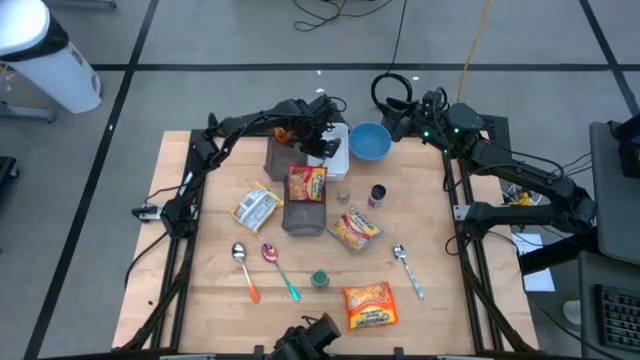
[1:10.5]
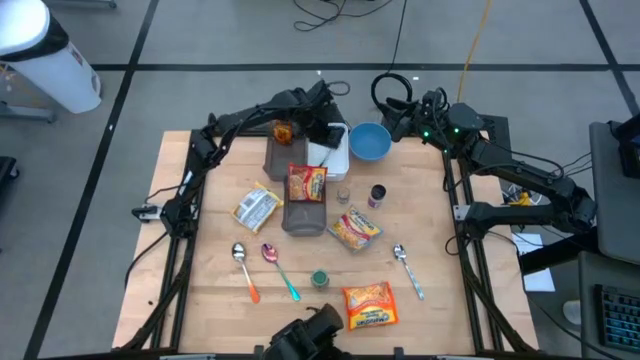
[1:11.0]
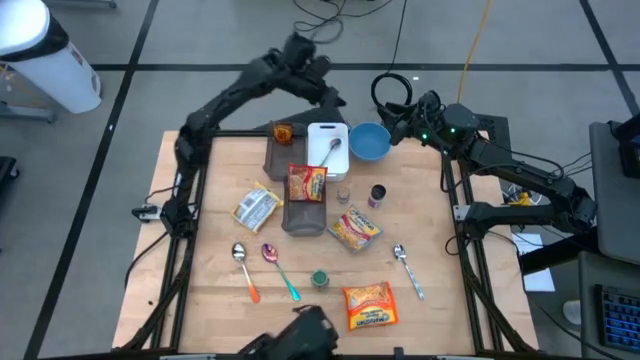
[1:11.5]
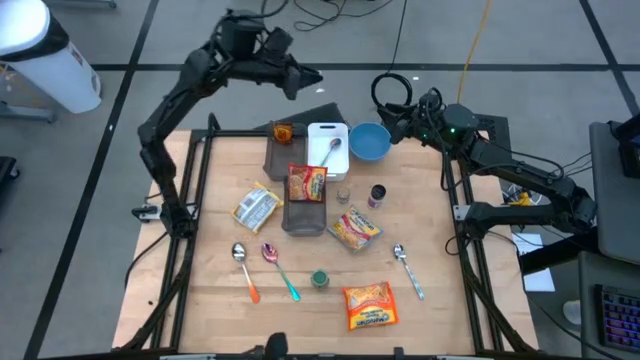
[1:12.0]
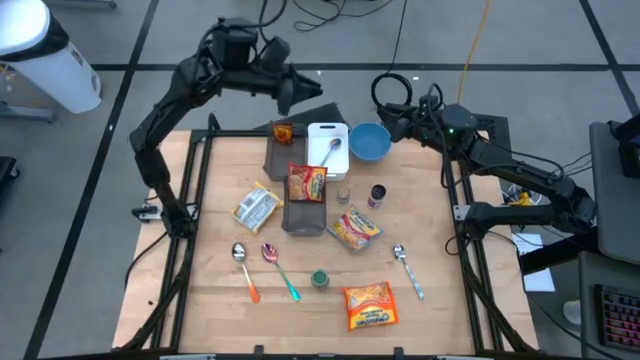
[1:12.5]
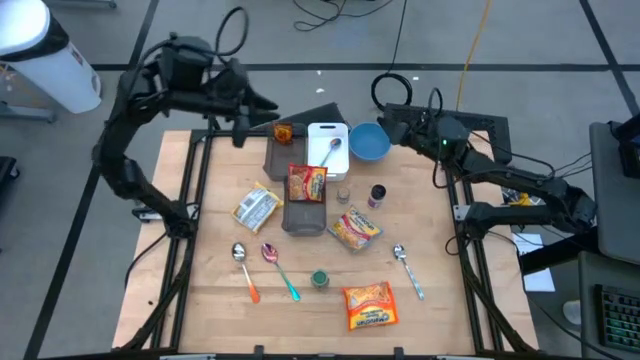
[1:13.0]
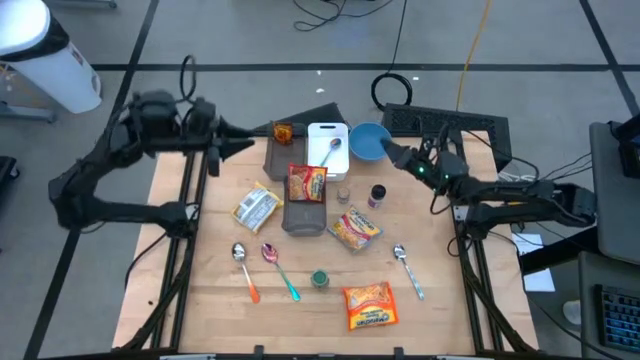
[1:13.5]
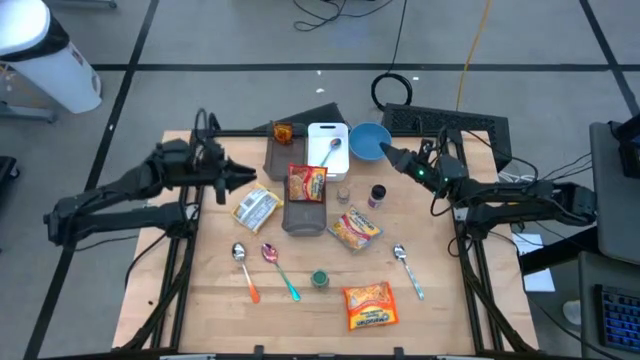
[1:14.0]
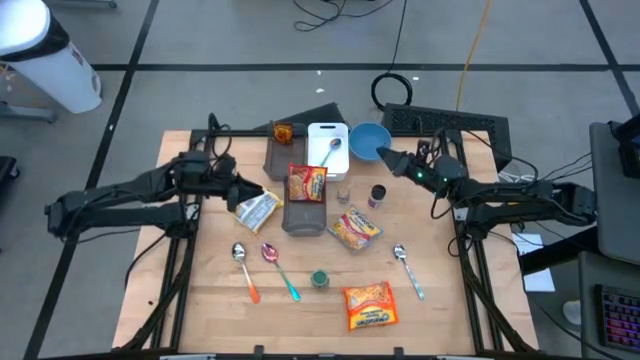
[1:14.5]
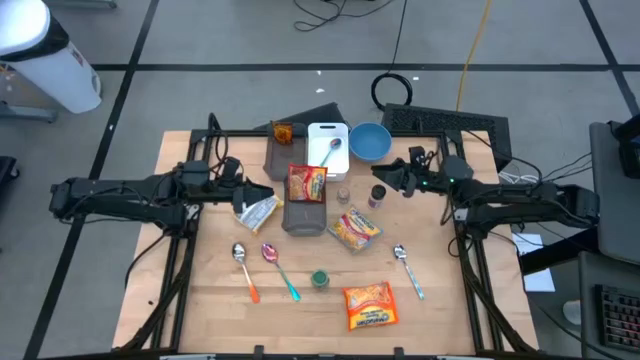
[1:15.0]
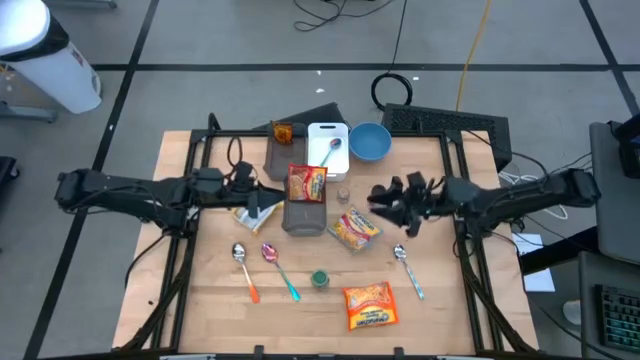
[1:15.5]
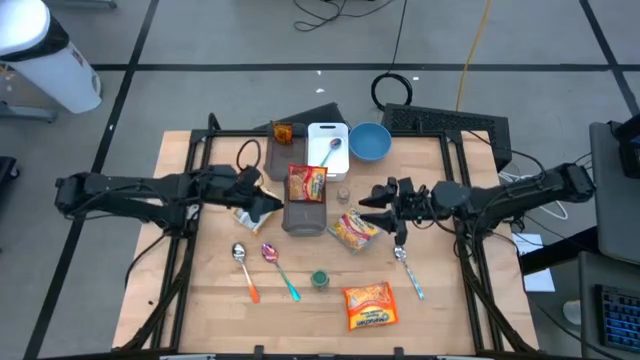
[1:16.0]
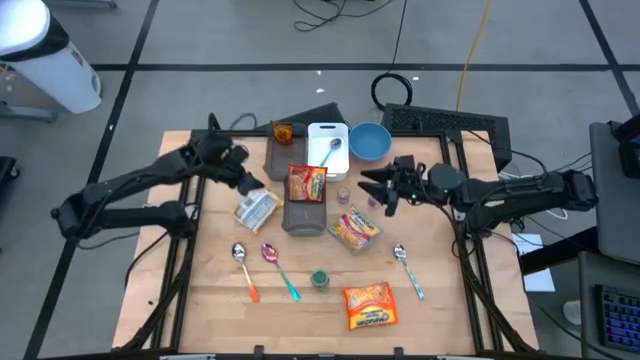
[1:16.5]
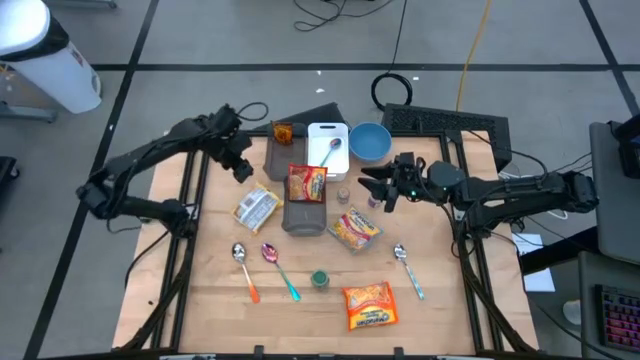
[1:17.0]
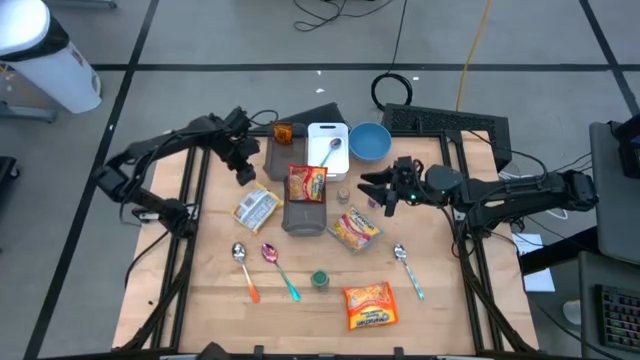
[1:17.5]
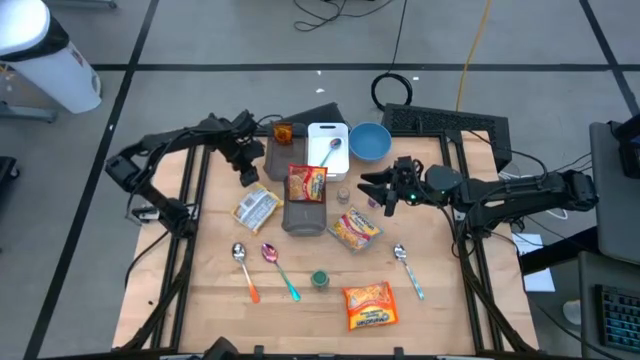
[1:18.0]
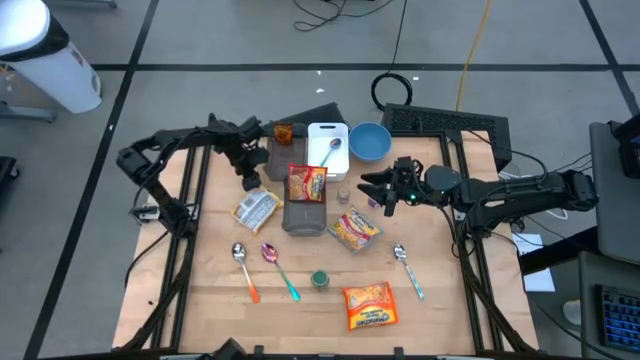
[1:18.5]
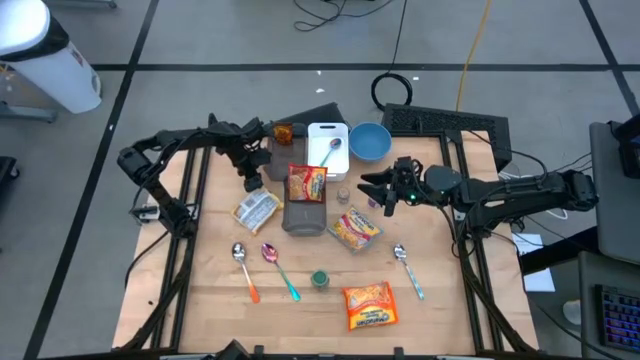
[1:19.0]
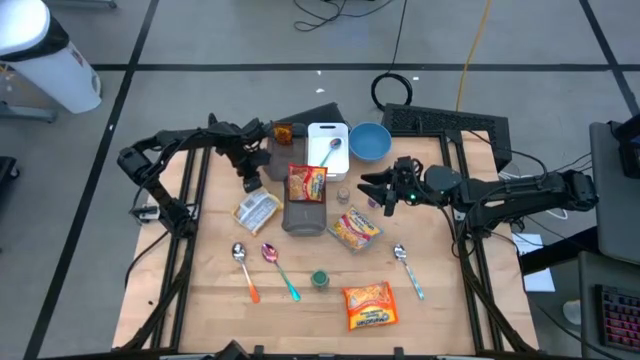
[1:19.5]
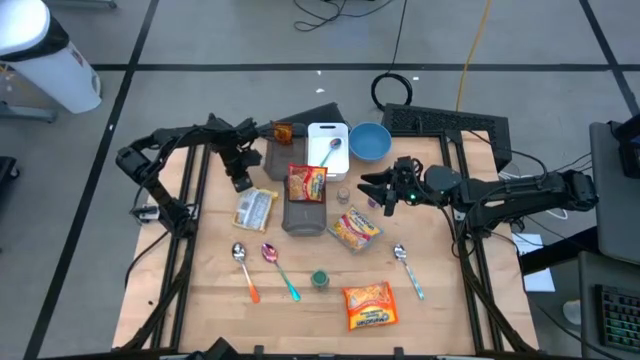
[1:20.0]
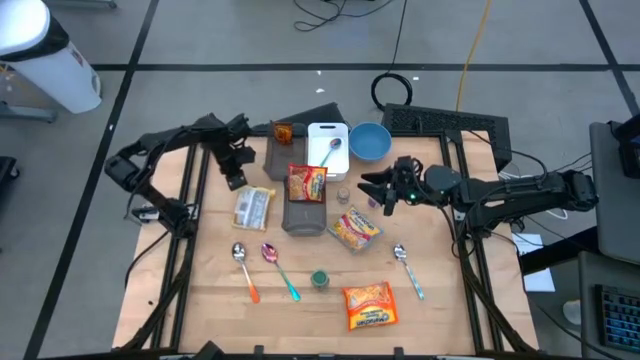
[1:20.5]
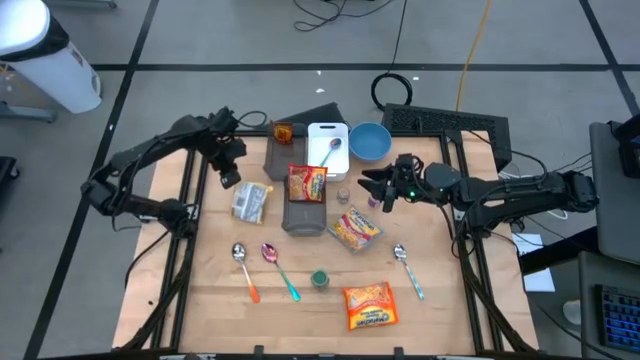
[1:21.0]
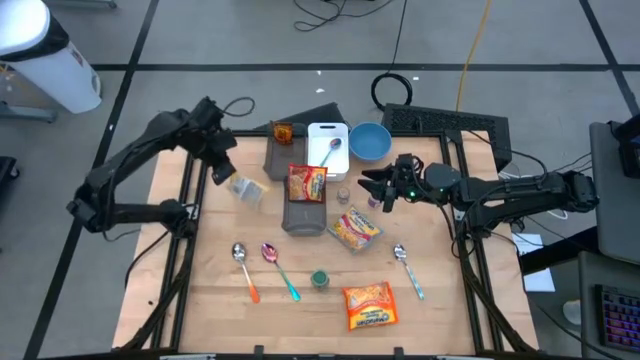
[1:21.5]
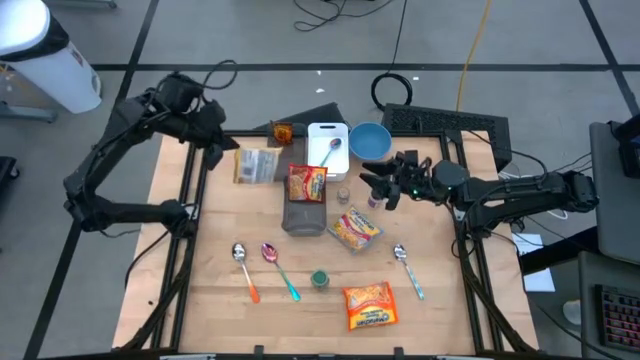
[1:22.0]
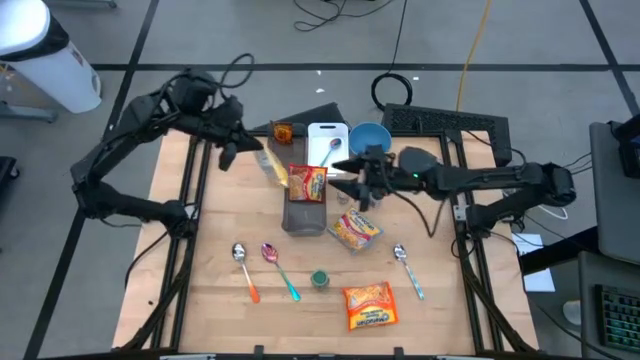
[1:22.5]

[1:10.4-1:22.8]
Task: Pick & Place Food Item
Put the yellow noodle pack into the bottom black bin

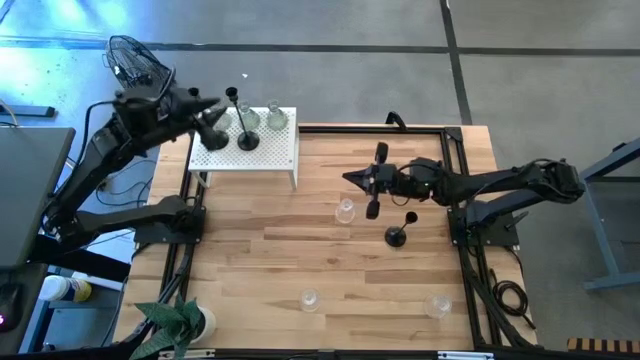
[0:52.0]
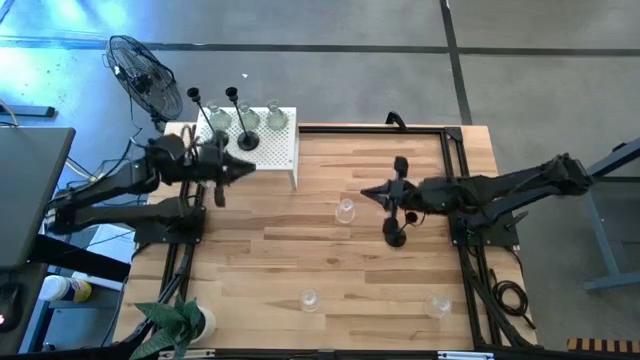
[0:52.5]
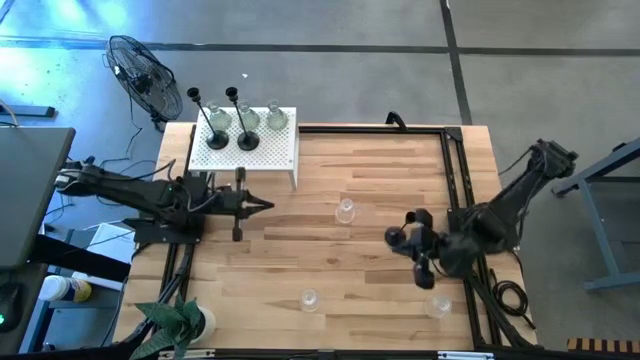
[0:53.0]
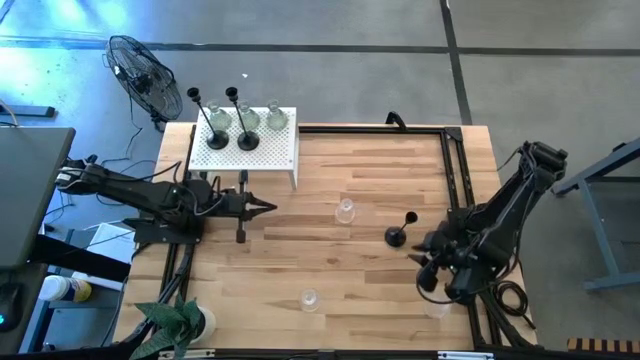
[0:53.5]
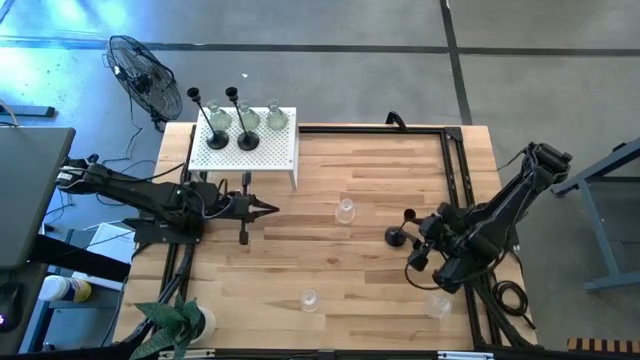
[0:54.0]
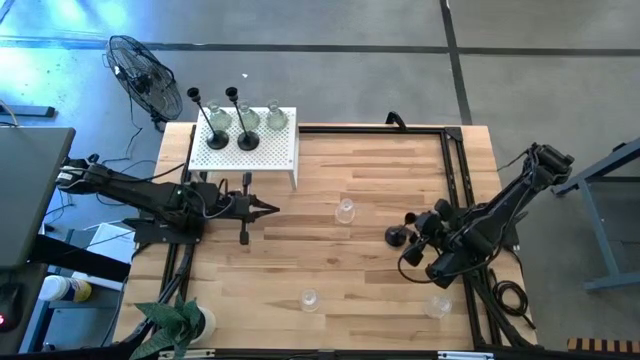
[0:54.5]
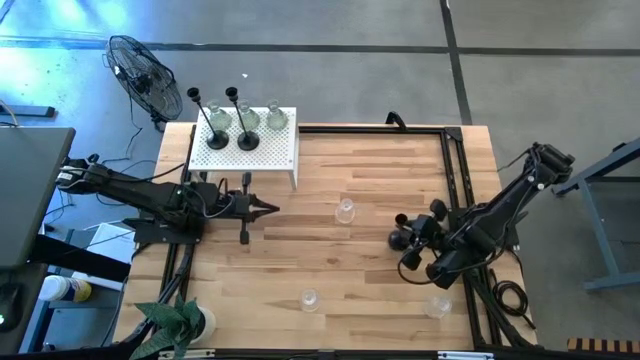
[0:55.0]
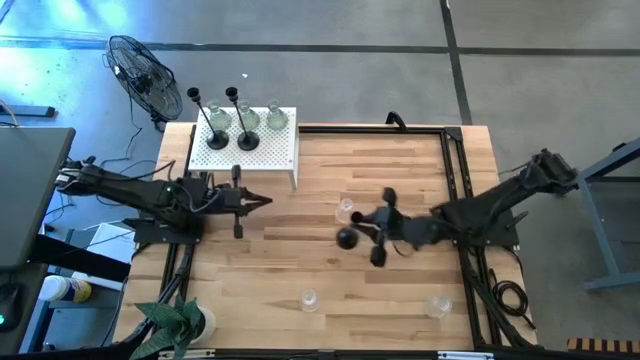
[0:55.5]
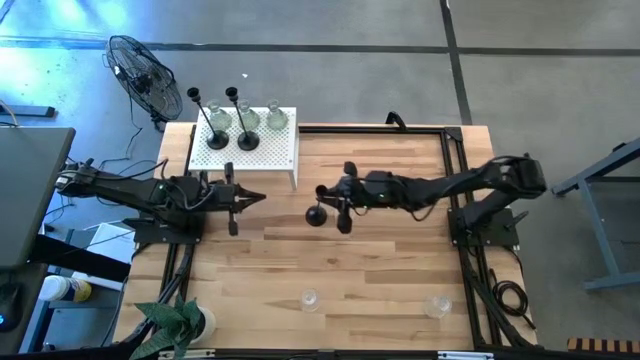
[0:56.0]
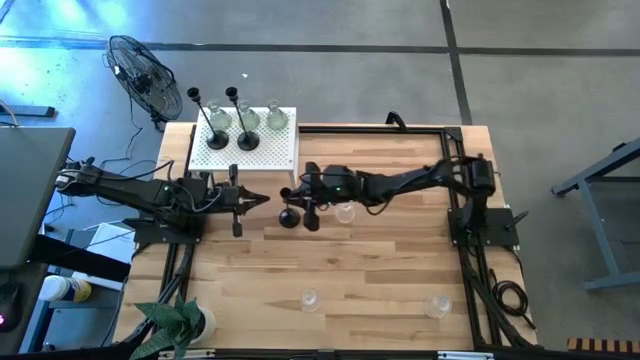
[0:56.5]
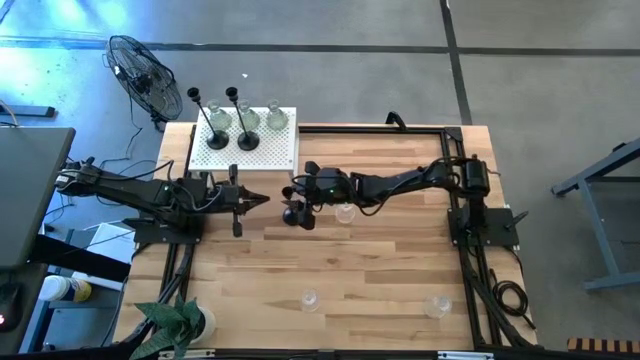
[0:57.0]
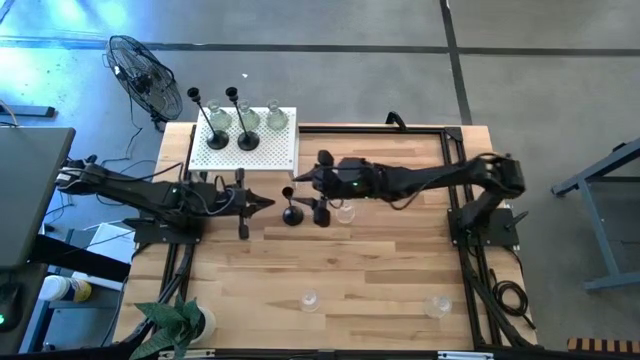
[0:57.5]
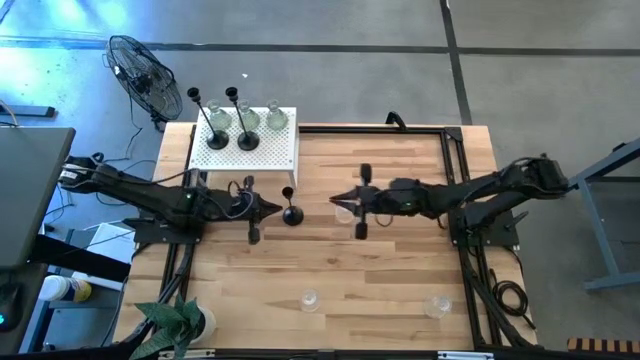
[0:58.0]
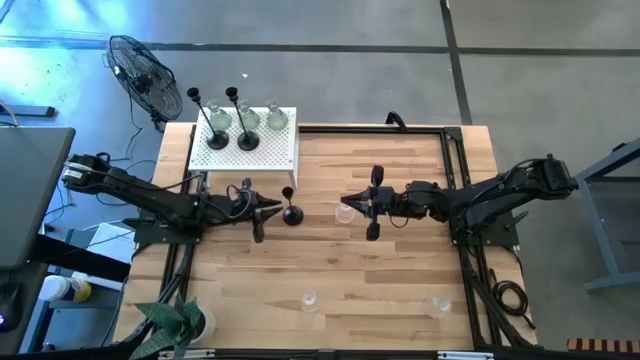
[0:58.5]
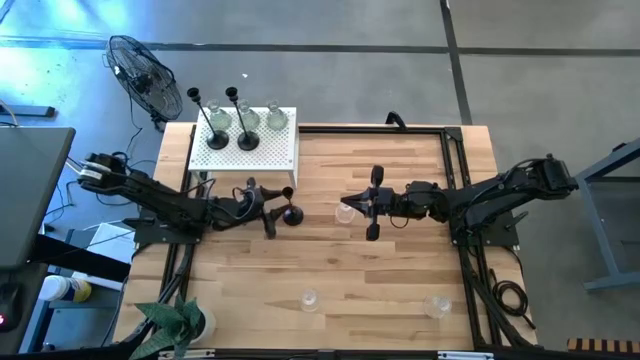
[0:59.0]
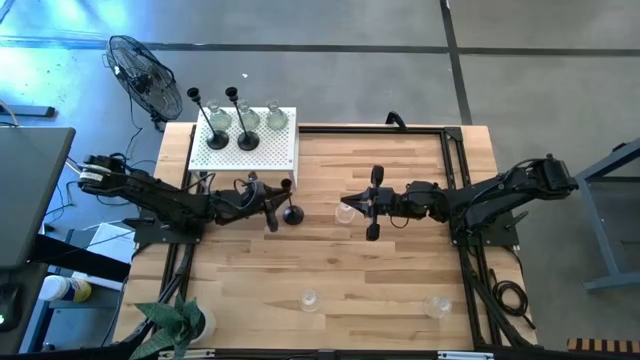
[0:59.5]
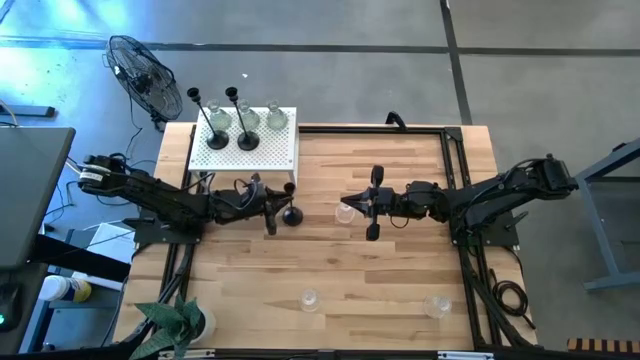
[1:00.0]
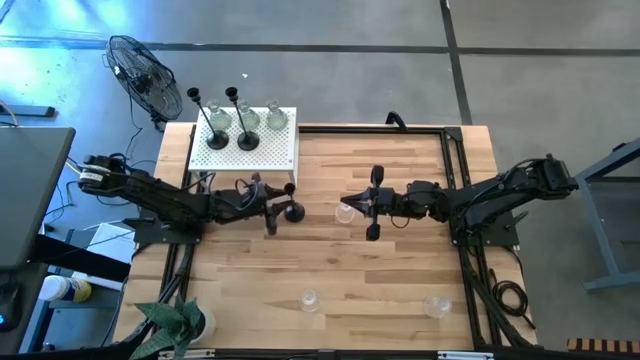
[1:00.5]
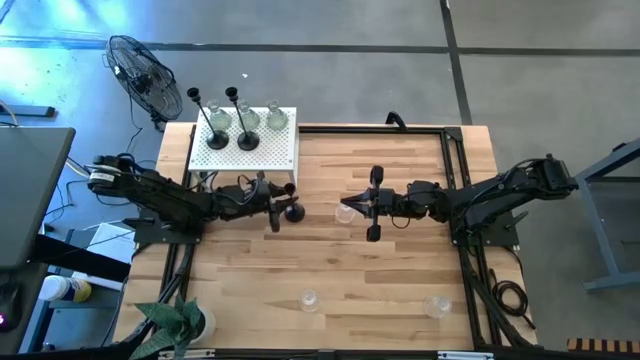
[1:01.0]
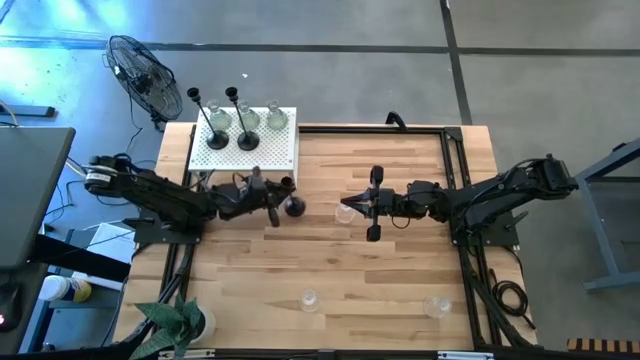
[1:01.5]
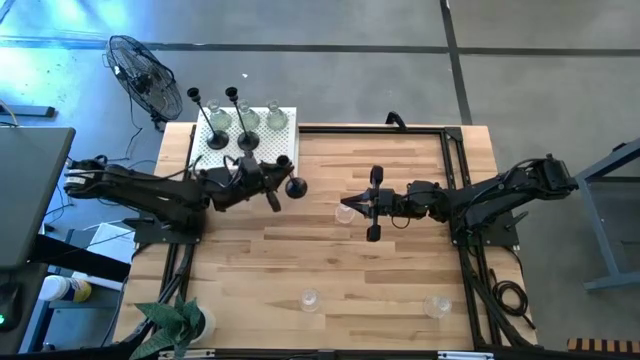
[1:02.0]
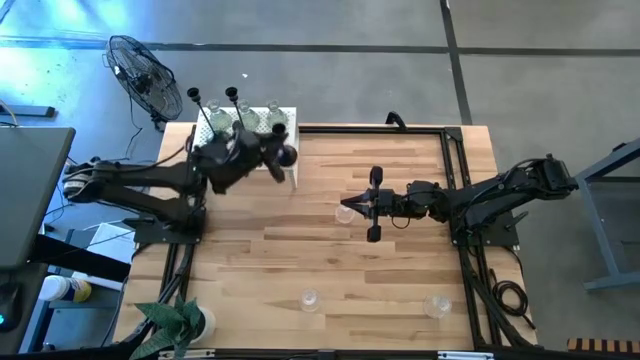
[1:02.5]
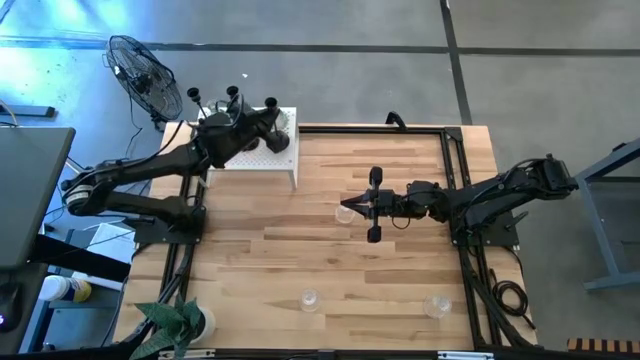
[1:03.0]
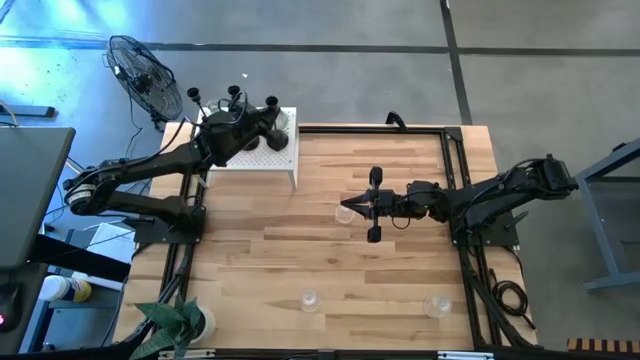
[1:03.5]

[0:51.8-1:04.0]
Task: Pick & Place candle stick holders
Put the black candle holder on the shelf aligned with the other black candle holders
